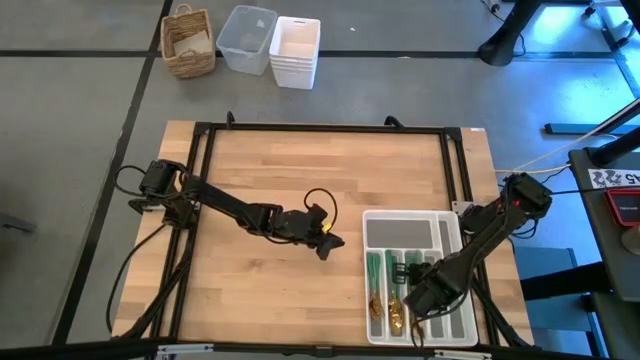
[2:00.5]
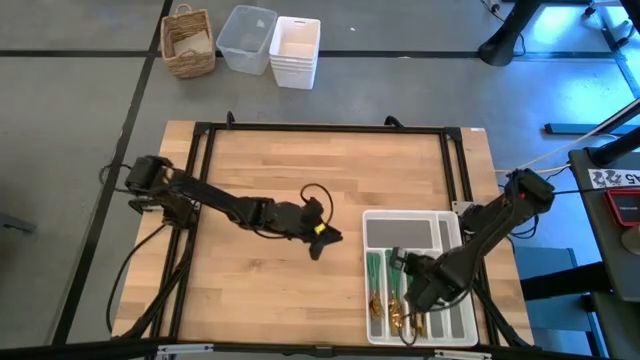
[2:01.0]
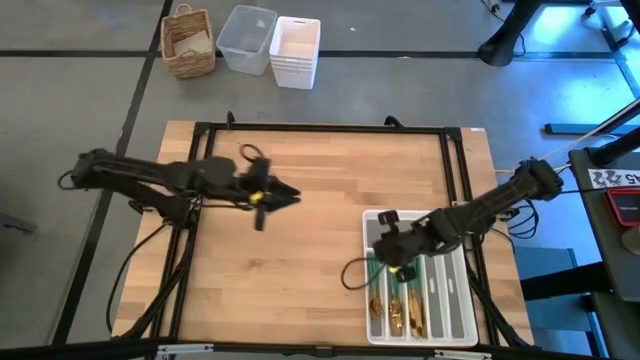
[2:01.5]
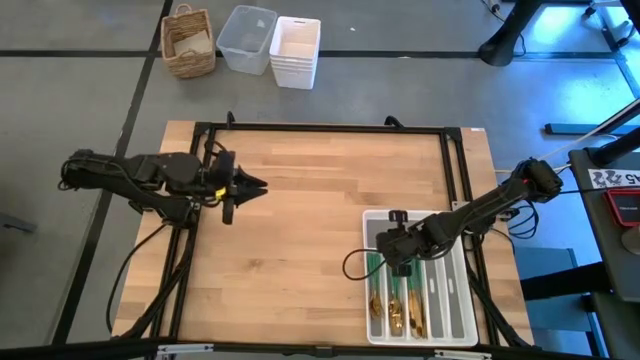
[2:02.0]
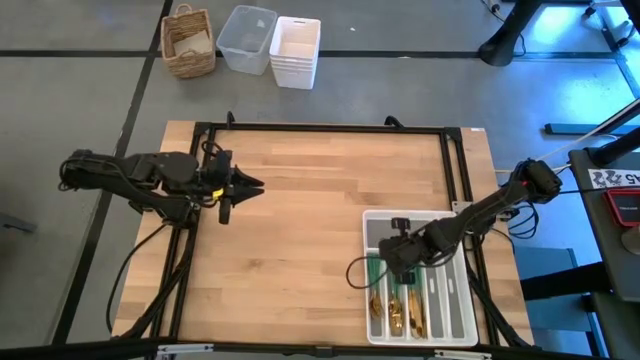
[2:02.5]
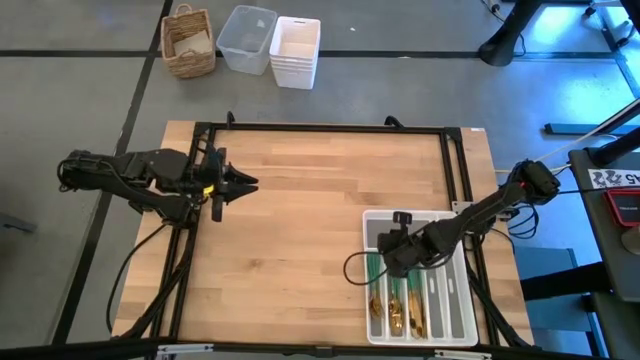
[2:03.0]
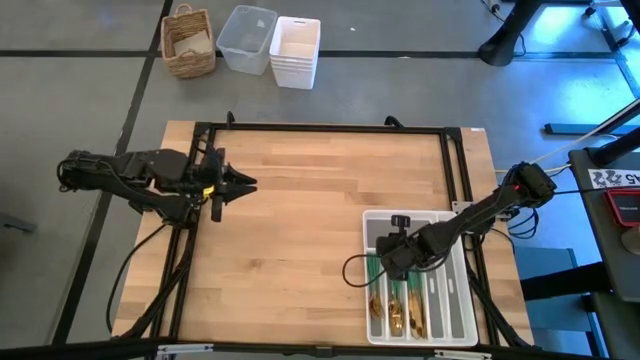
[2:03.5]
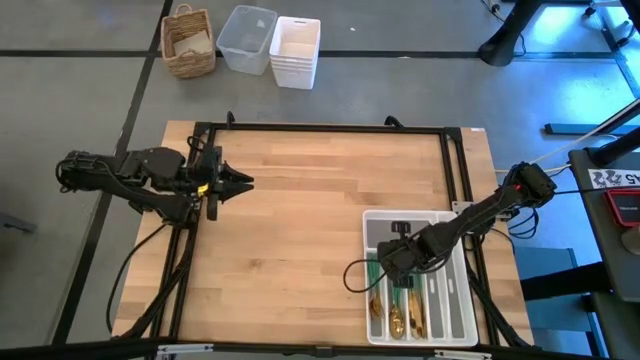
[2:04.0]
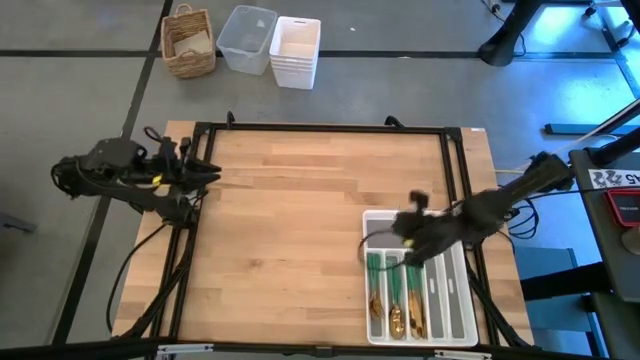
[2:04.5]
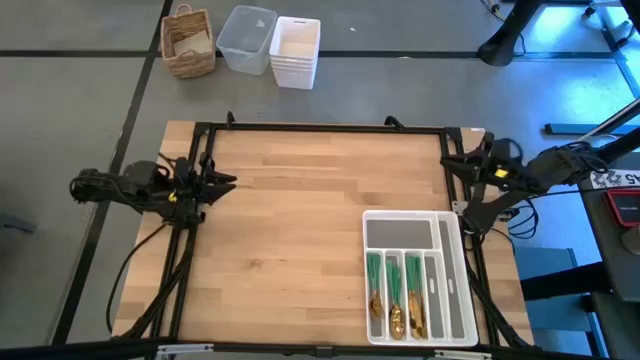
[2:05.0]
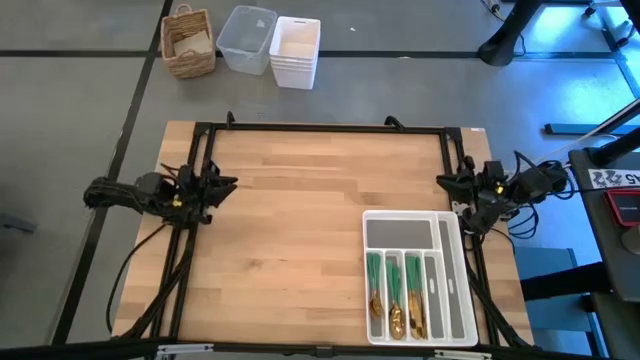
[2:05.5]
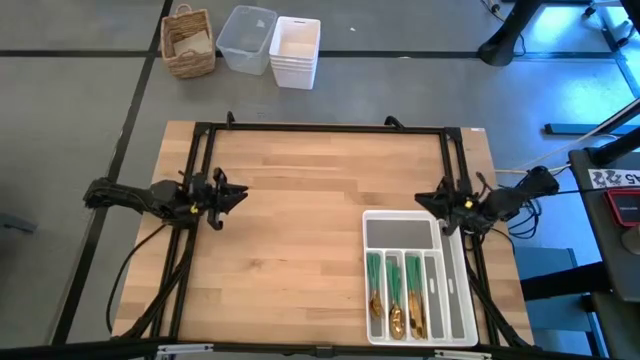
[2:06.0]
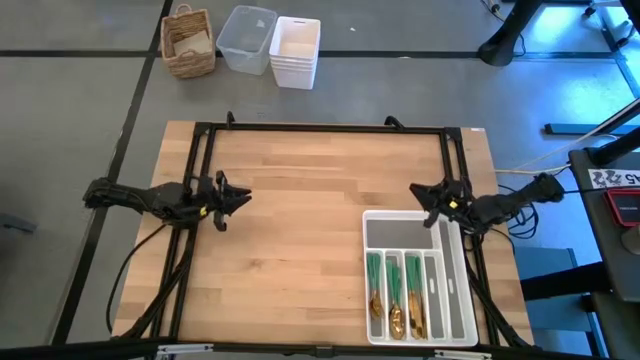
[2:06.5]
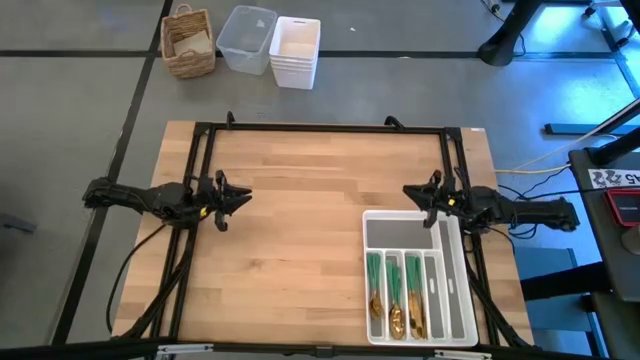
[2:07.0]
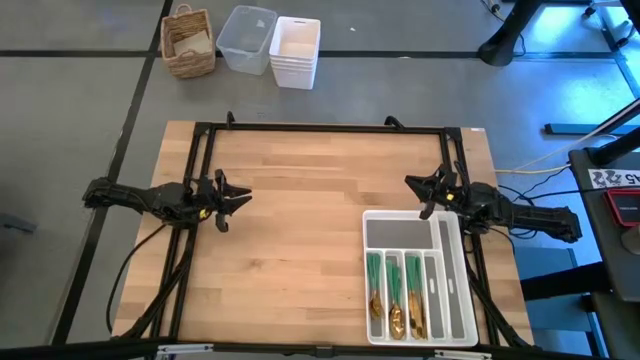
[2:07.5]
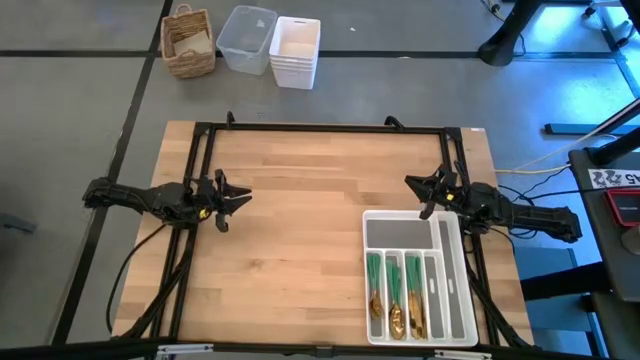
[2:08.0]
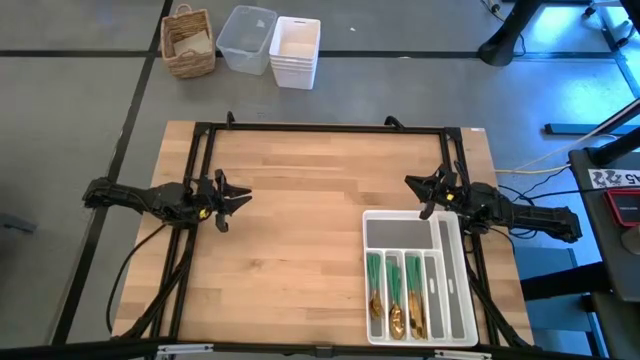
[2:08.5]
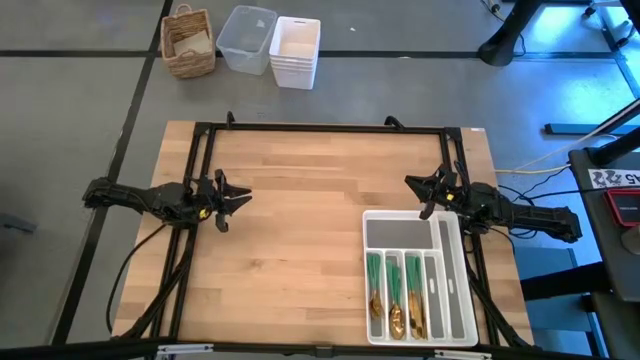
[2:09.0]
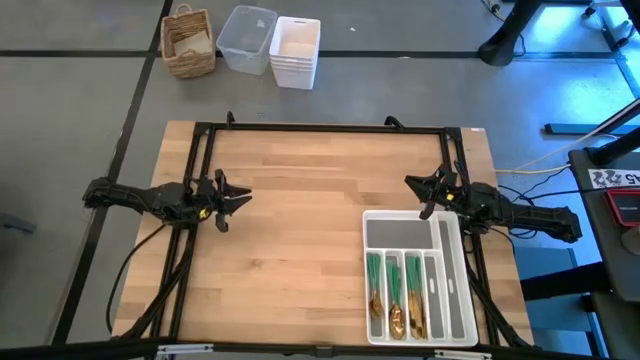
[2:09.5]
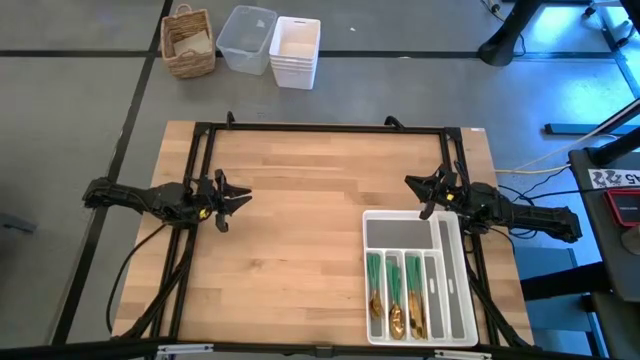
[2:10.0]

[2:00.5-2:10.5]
Task: Sort silverware
Return to Home Position

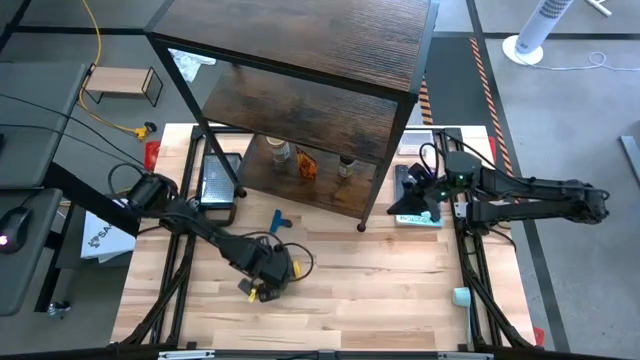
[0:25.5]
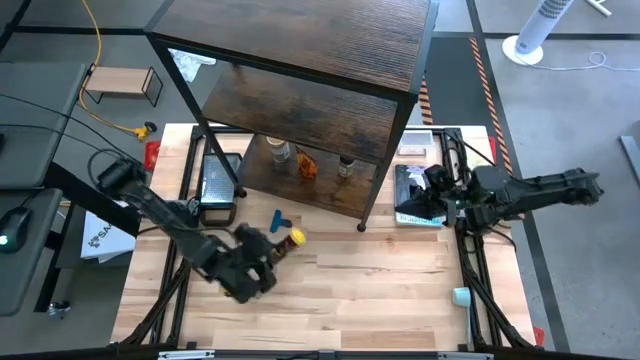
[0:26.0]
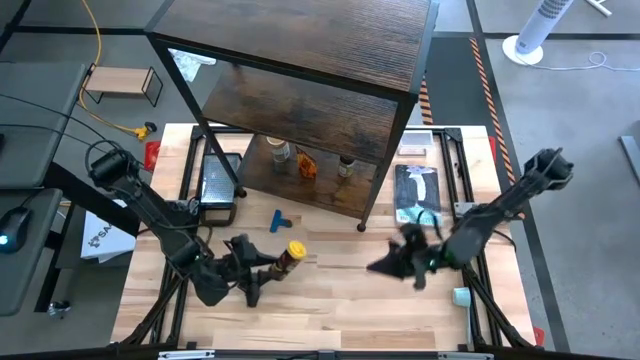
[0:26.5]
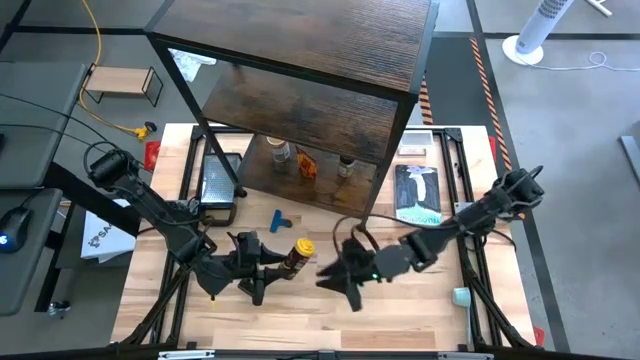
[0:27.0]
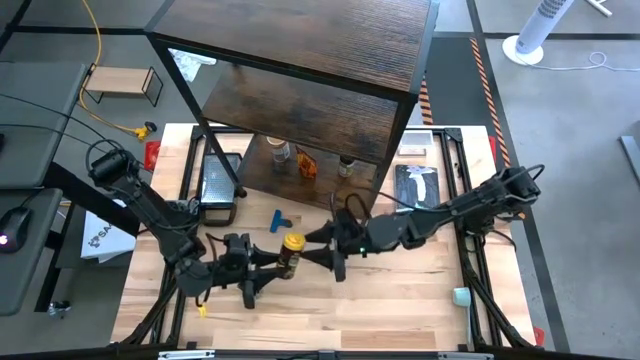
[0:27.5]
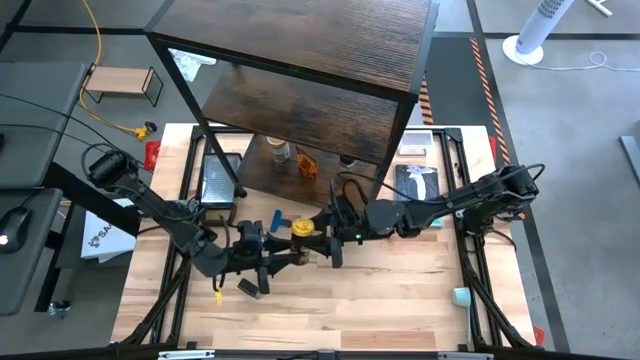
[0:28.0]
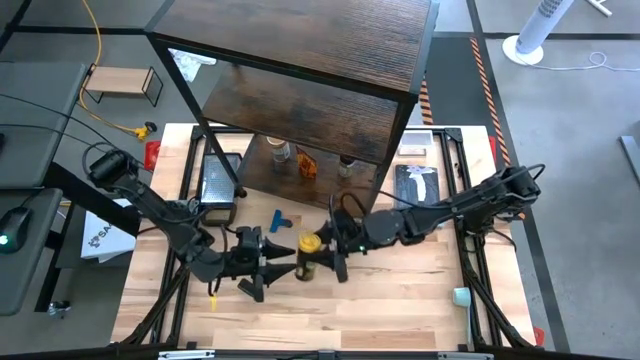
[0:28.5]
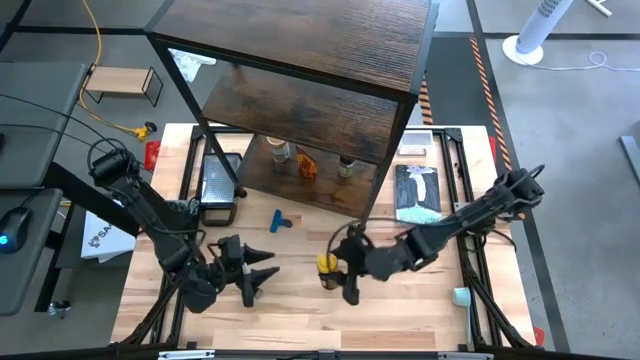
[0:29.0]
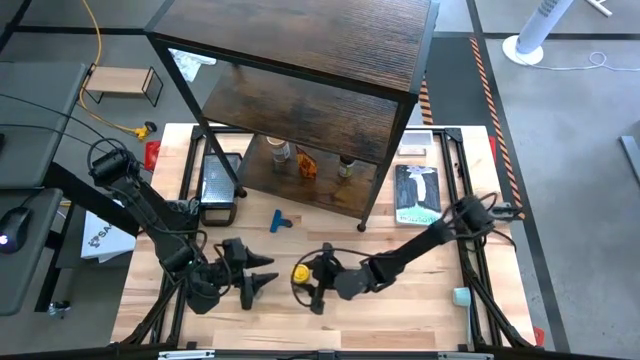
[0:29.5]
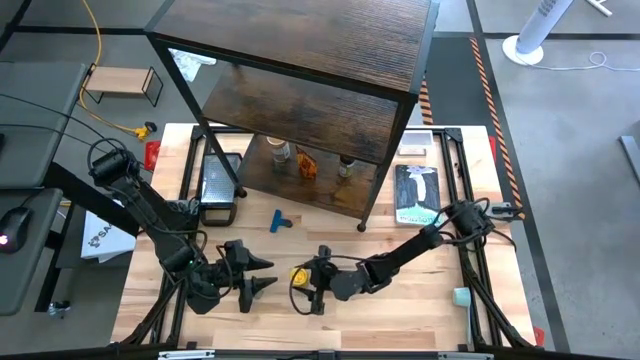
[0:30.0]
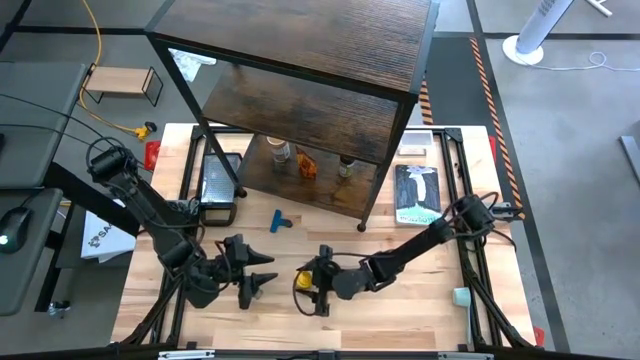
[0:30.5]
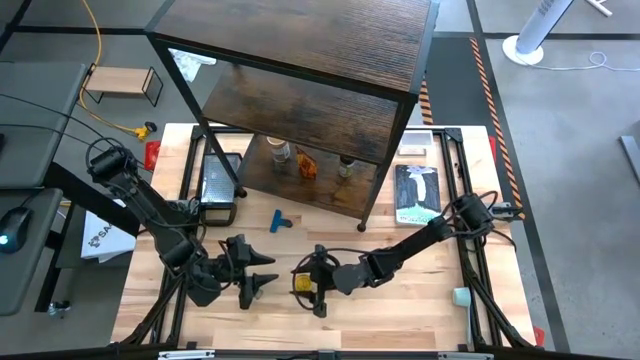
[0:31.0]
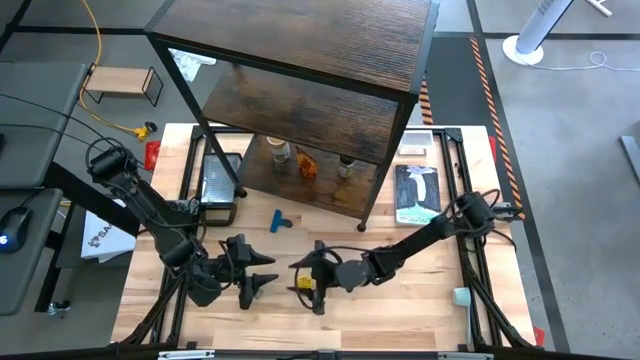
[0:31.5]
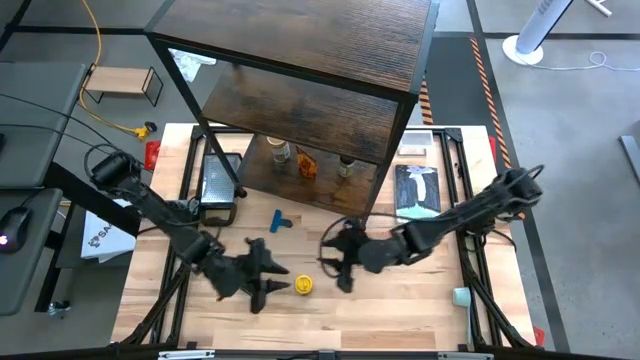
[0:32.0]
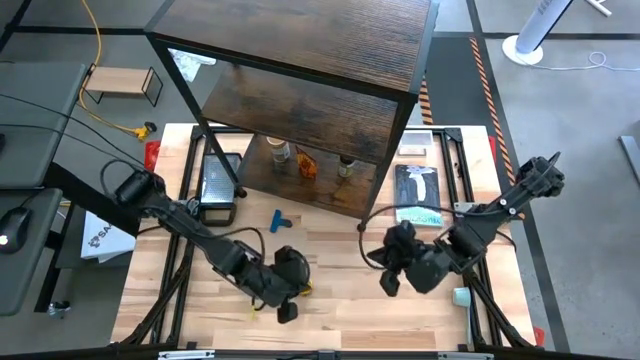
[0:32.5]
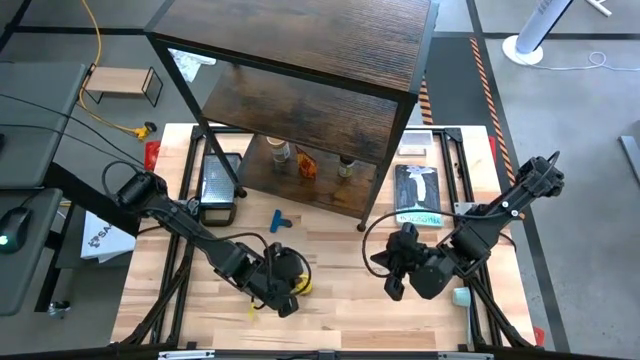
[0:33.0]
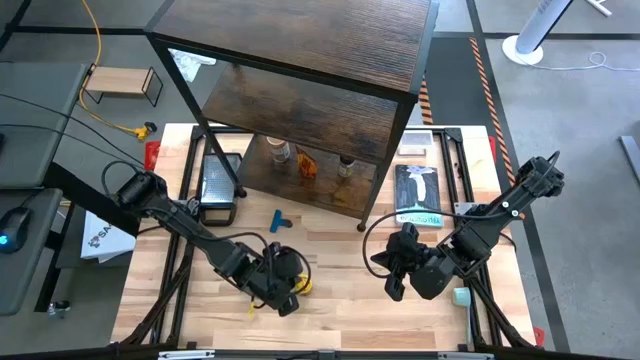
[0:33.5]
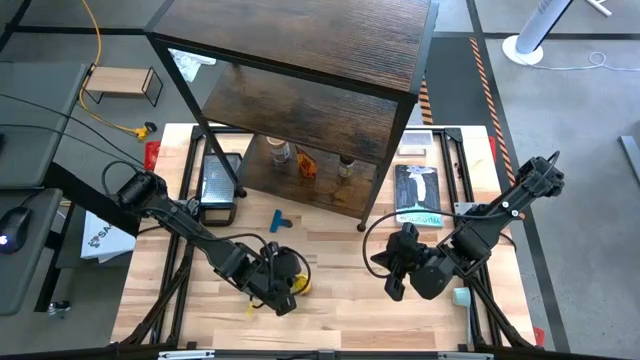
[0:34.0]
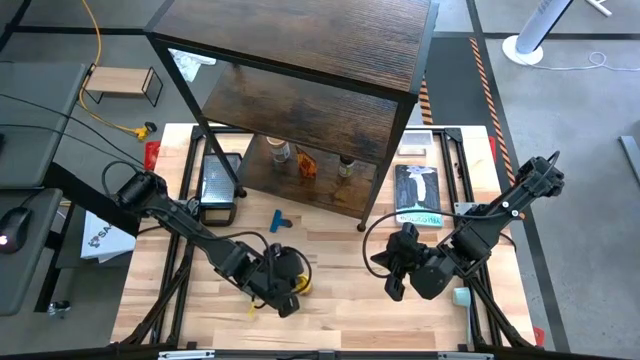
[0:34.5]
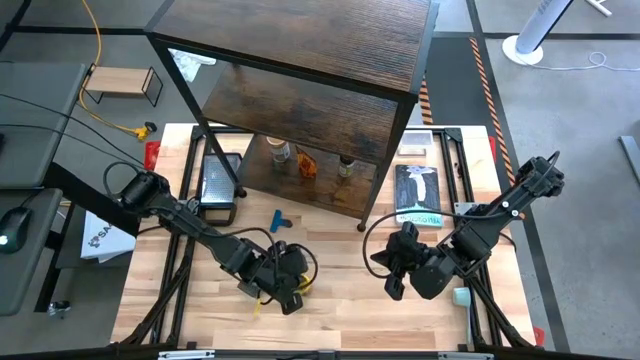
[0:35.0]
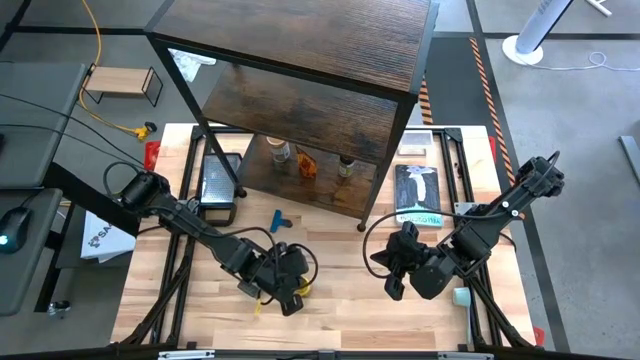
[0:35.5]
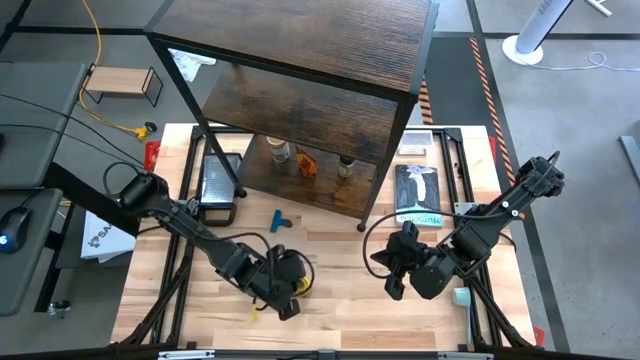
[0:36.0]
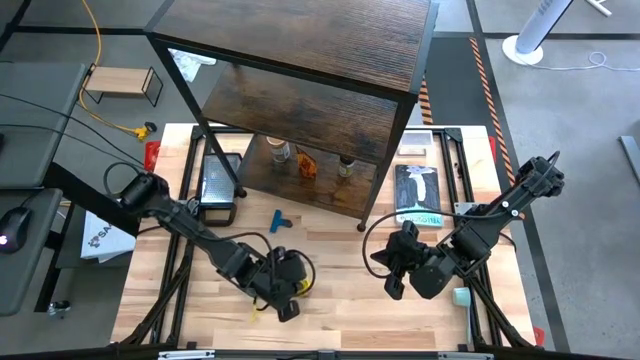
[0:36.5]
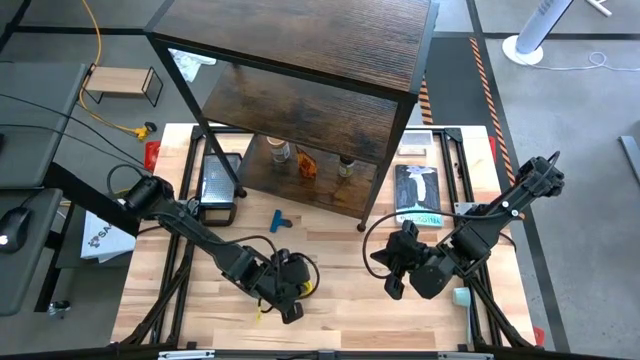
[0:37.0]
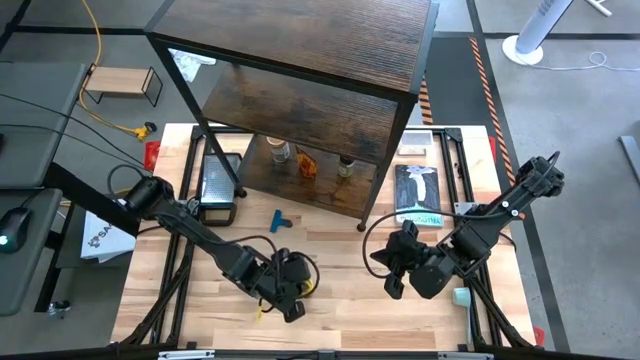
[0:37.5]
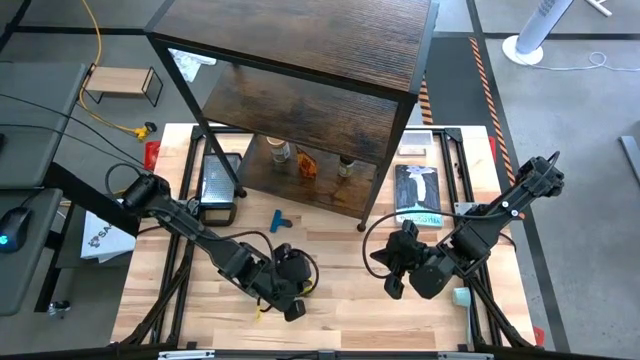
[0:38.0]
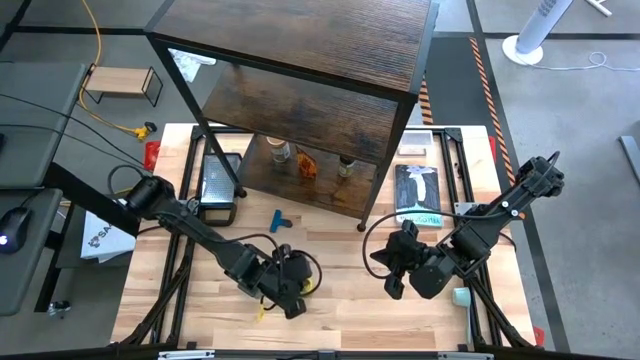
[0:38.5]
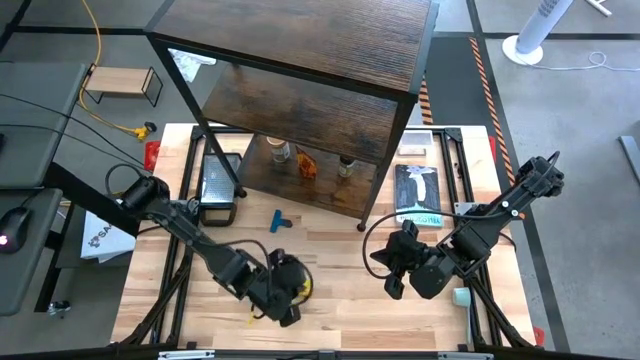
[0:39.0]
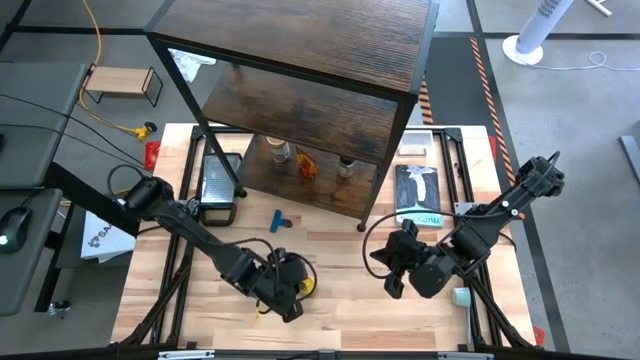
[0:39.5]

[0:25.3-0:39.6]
Task: Shelf spices
Remove the yellow seasoning can from the shelf
